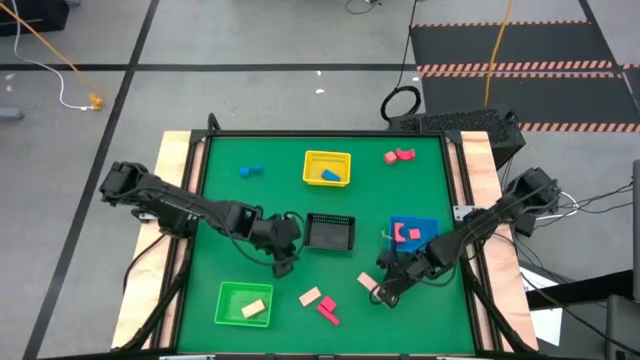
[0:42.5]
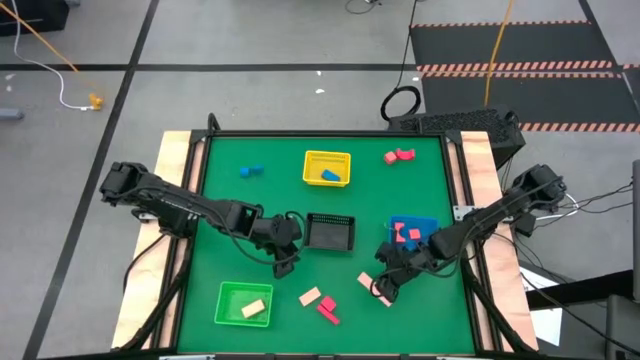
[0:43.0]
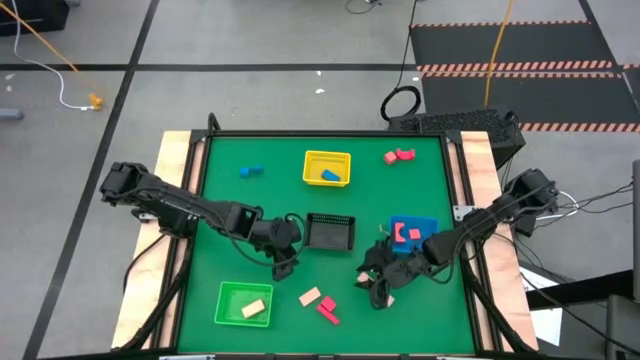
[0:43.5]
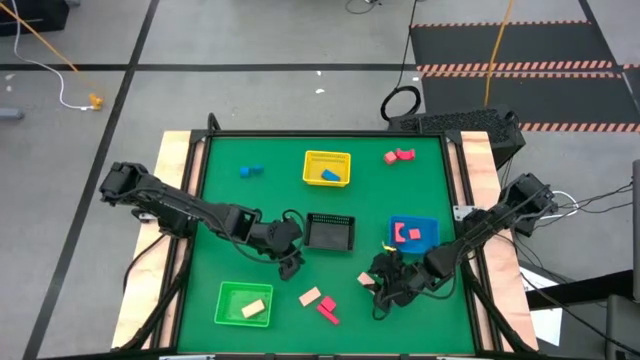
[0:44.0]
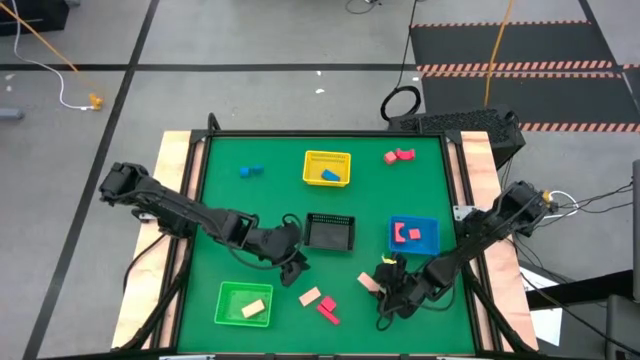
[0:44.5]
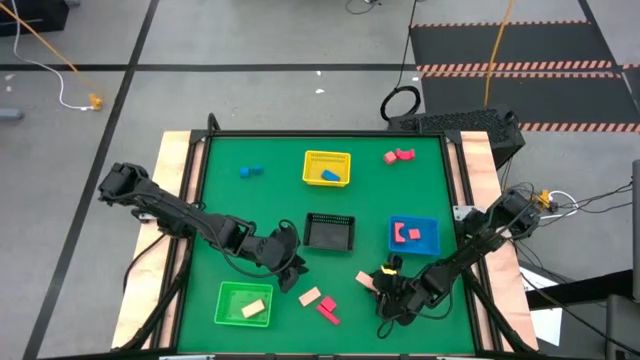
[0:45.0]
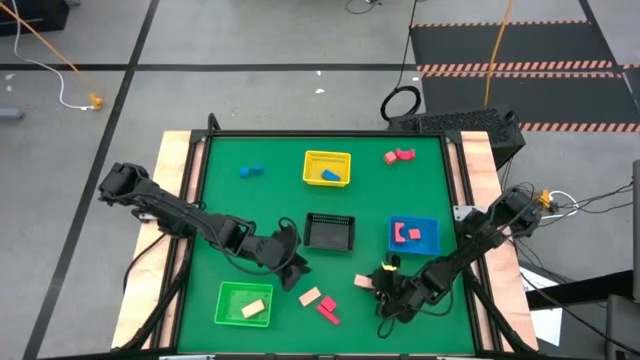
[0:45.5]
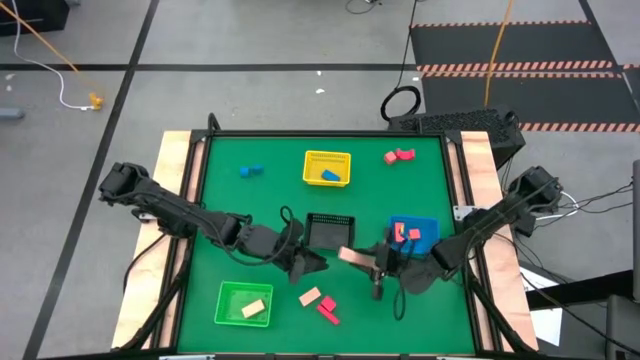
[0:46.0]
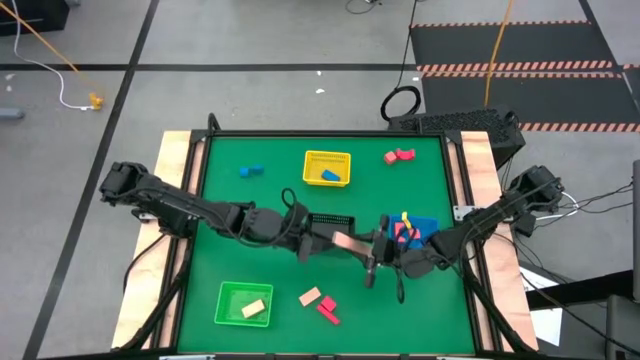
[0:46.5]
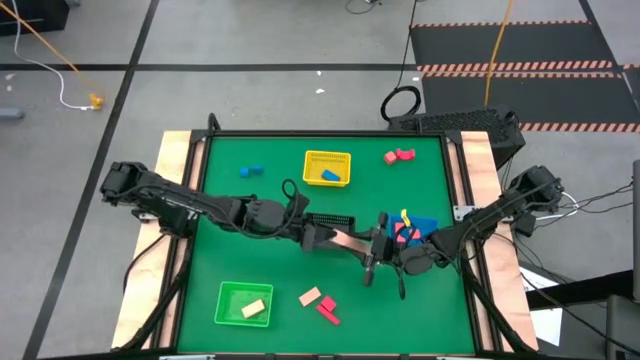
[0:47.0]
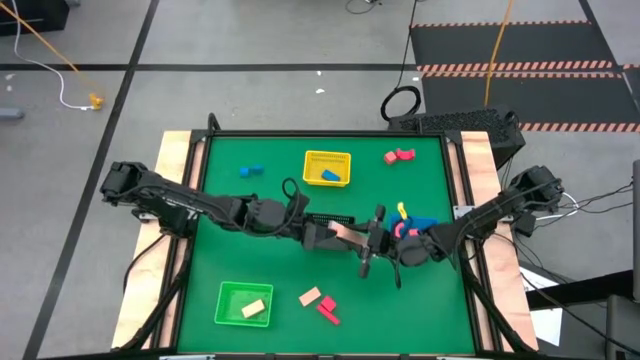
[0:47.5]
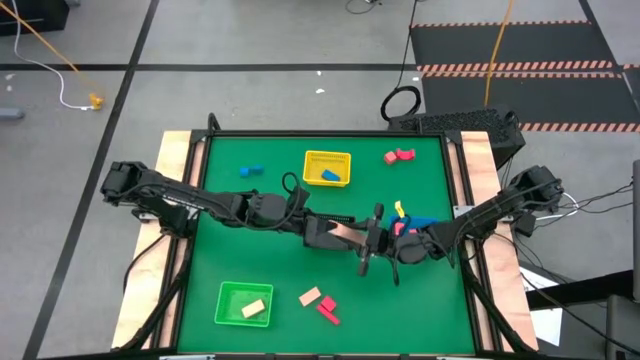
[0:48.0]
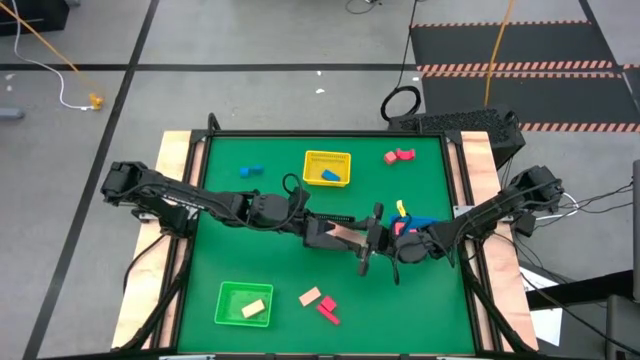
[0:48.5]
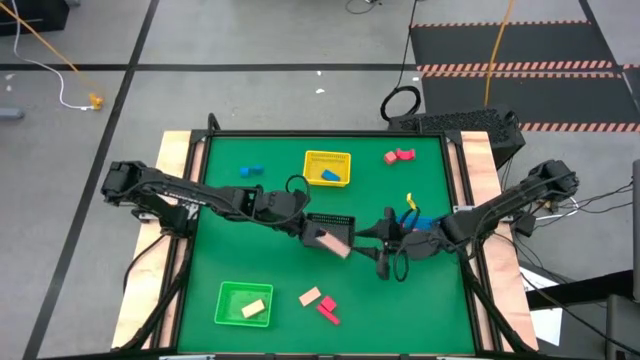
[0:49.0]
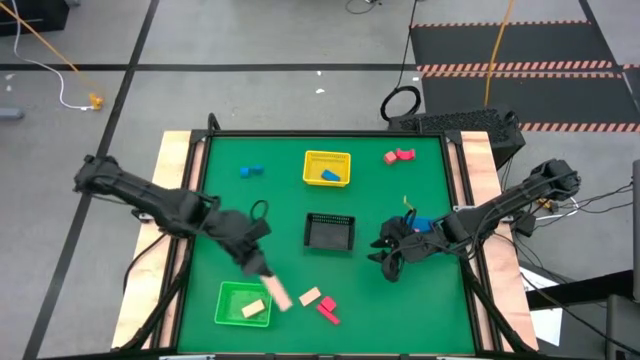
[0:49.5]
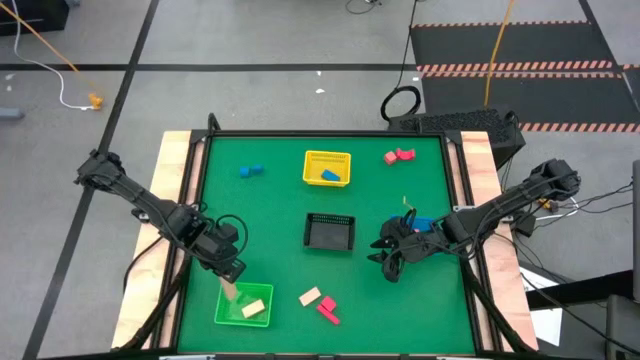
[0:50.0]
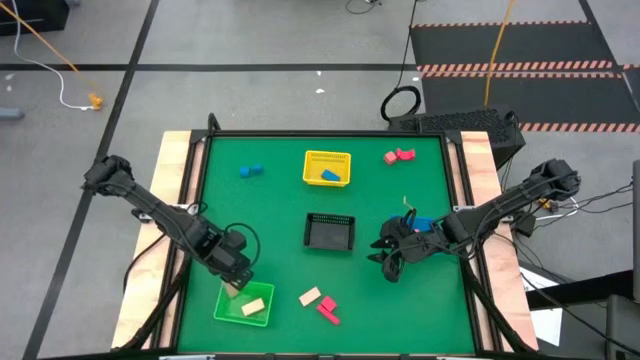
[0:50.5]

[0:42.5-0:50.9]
Task: Sort & place blocks by color
Put the right brown block into the green bin

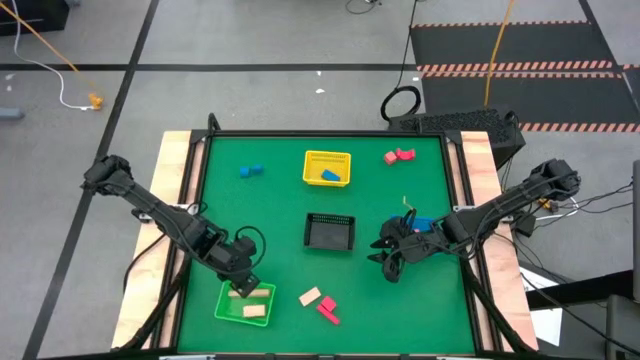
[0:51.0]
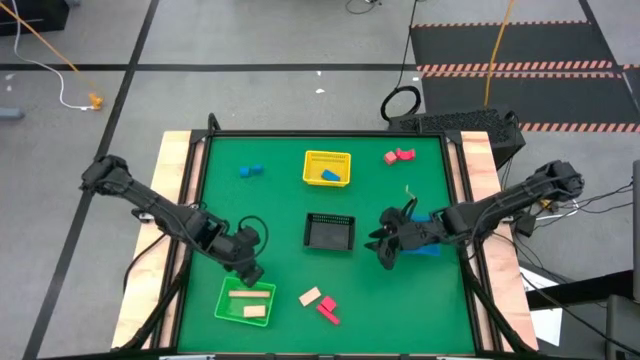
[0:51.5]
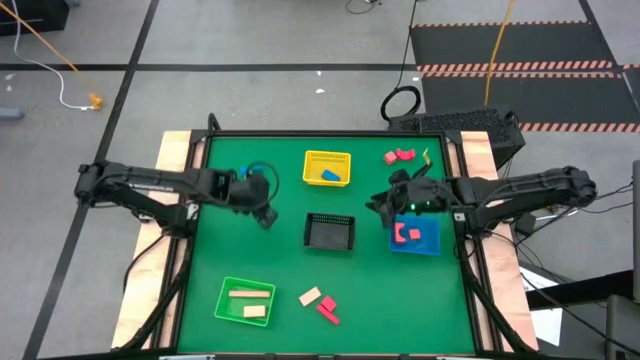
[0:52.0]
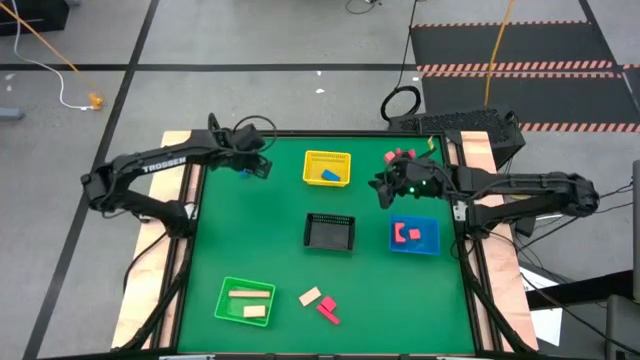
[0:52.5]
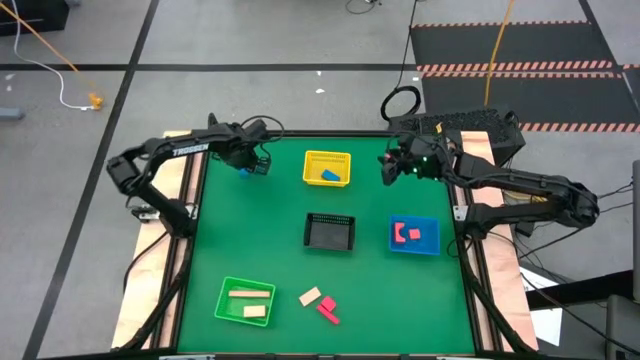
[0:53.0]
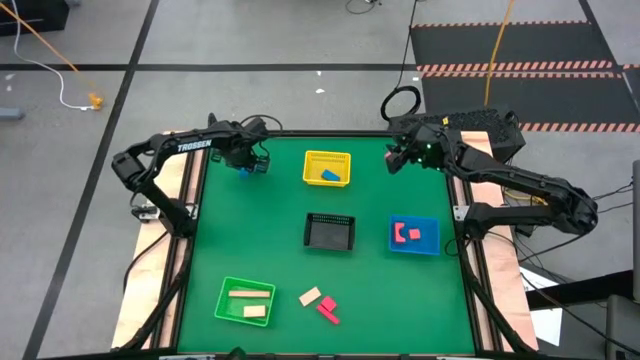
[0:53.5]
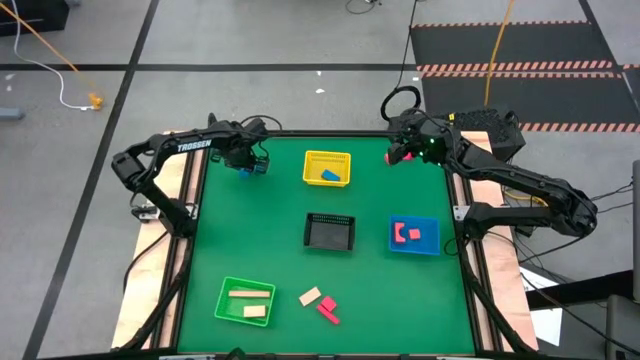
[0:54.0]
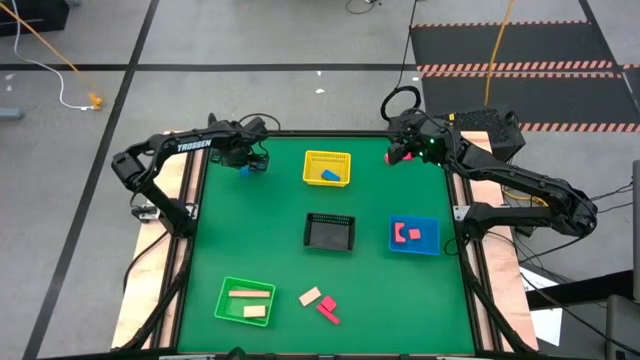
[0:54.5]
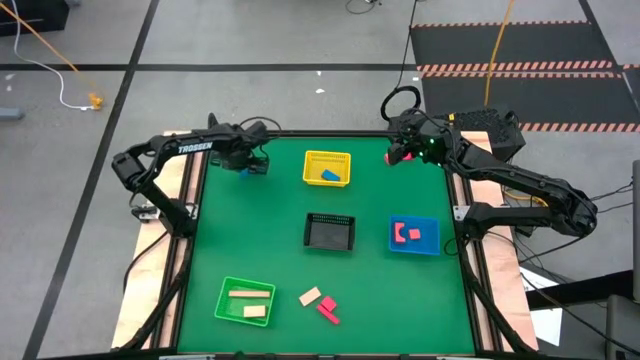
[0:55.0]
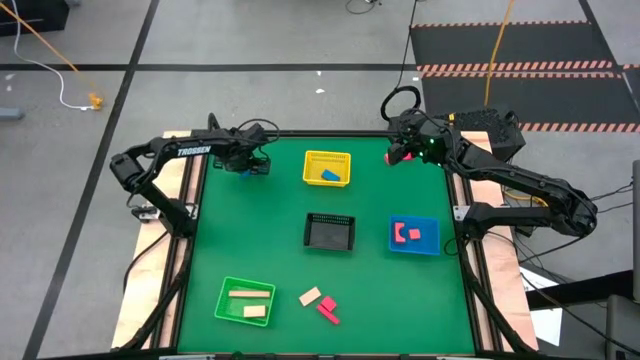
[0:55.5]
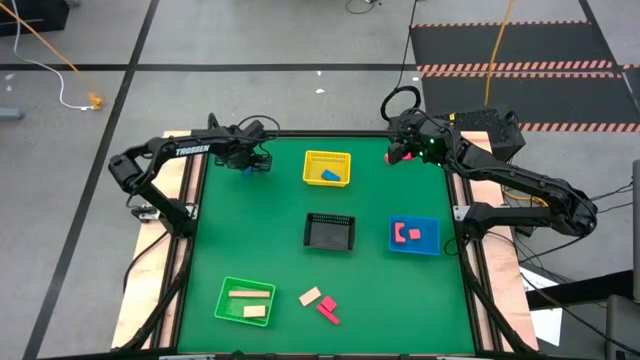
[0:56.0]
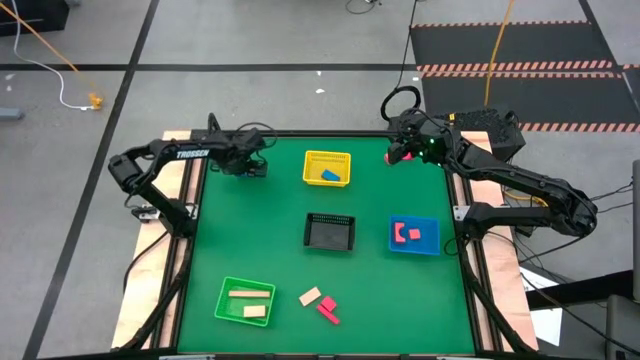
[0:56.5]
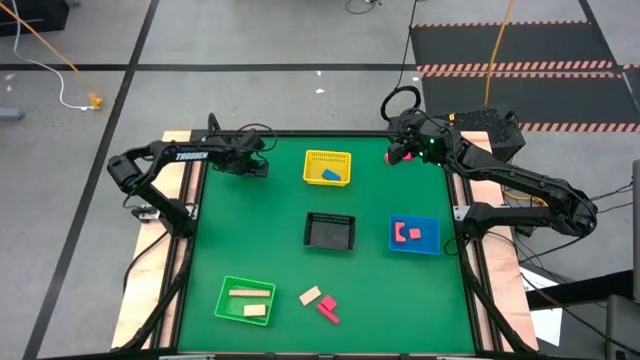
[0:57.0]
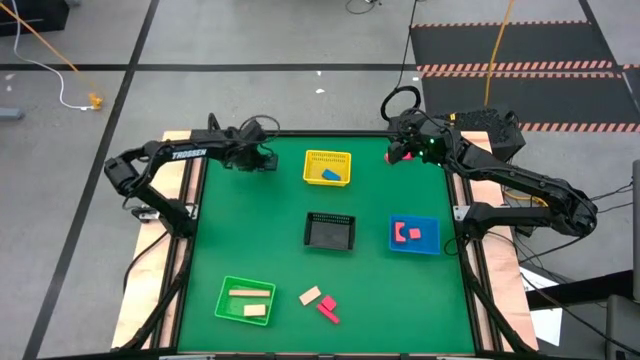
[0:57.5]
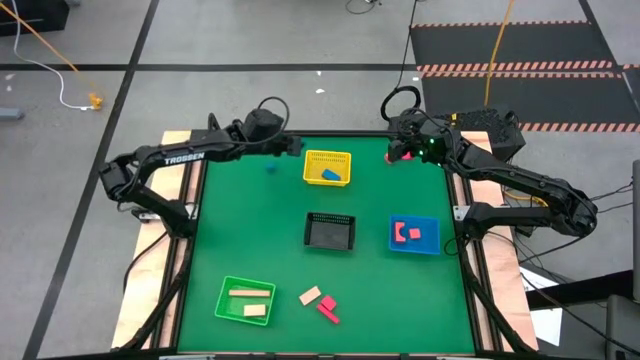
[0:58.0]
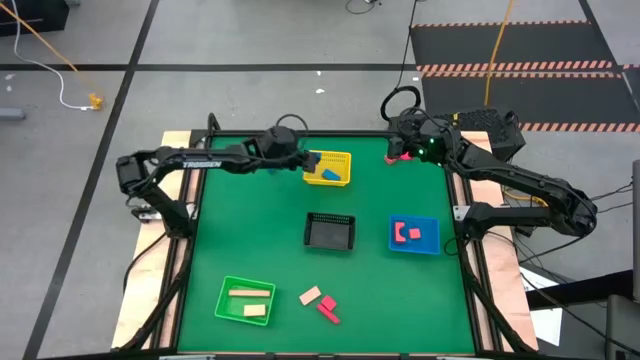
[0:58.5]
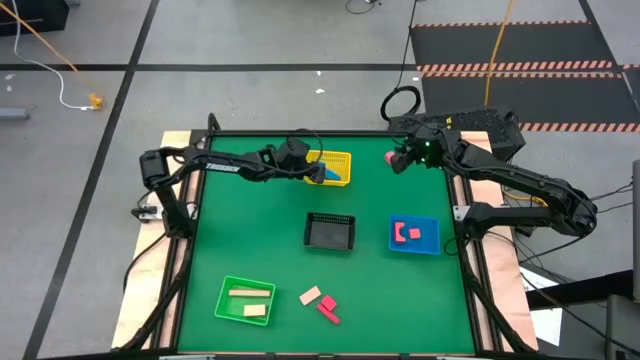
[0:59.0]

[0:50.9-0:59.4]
Put the left blue block into the yellow bin

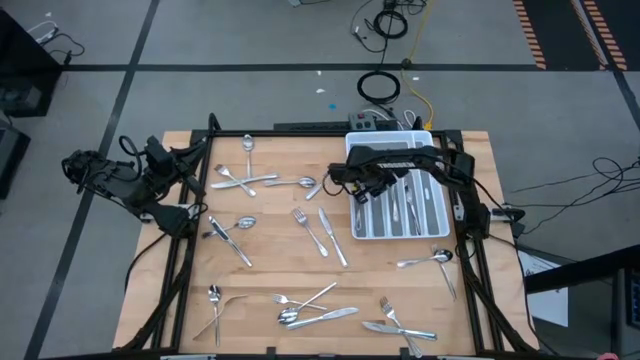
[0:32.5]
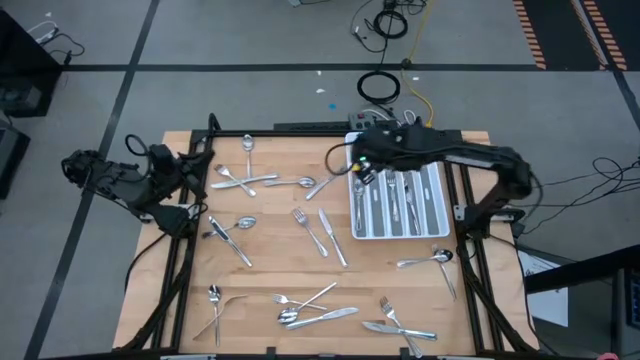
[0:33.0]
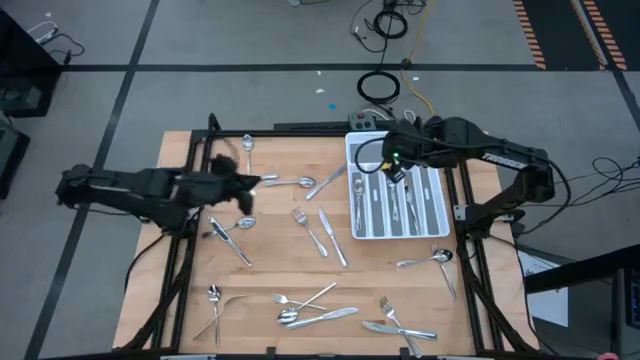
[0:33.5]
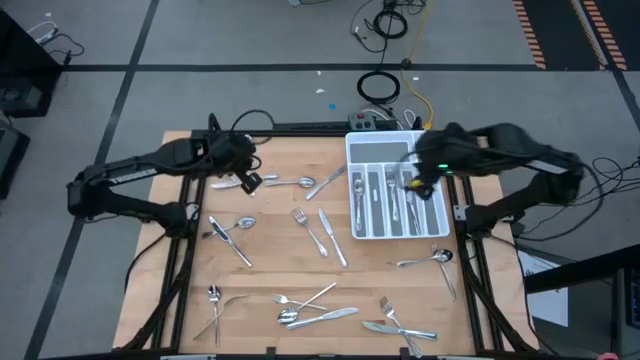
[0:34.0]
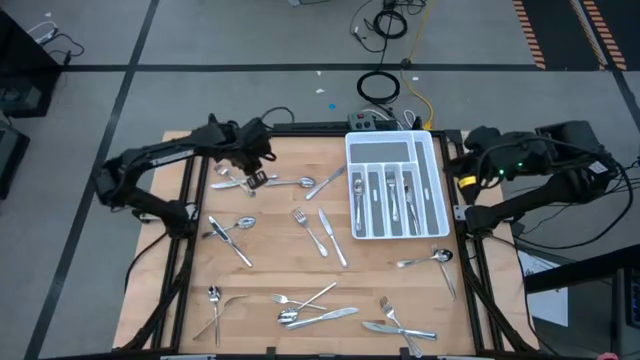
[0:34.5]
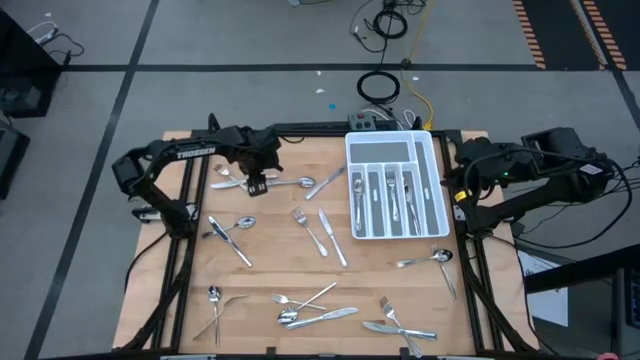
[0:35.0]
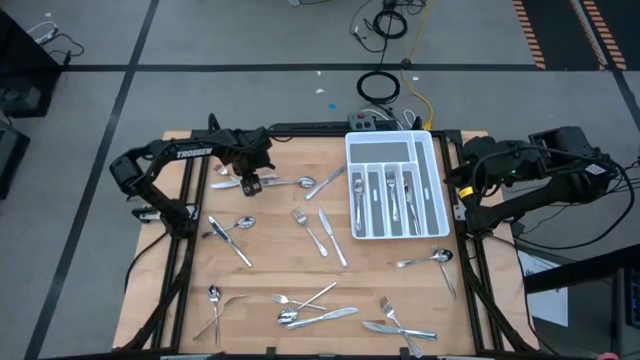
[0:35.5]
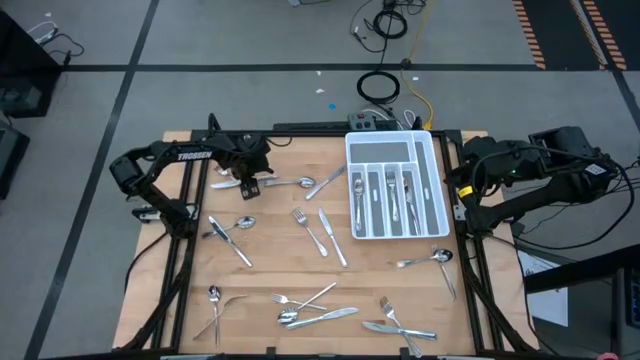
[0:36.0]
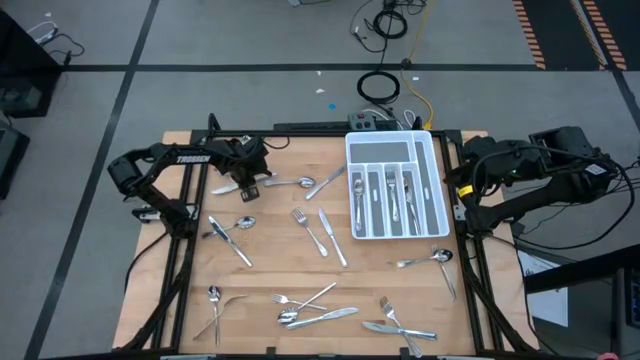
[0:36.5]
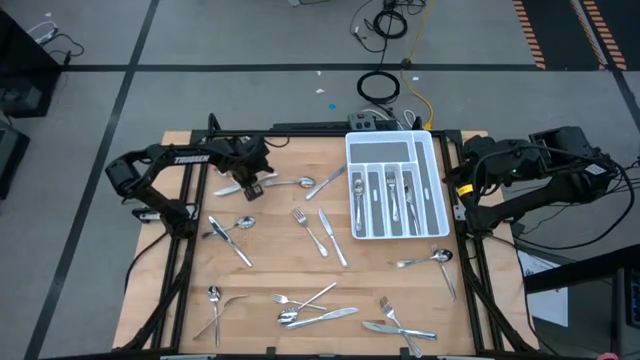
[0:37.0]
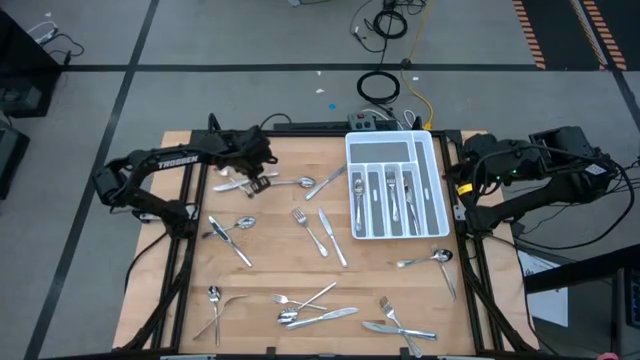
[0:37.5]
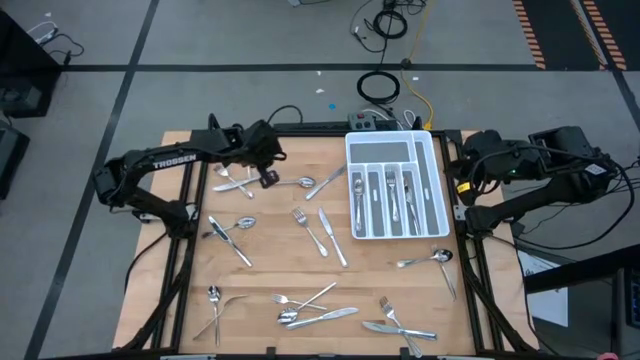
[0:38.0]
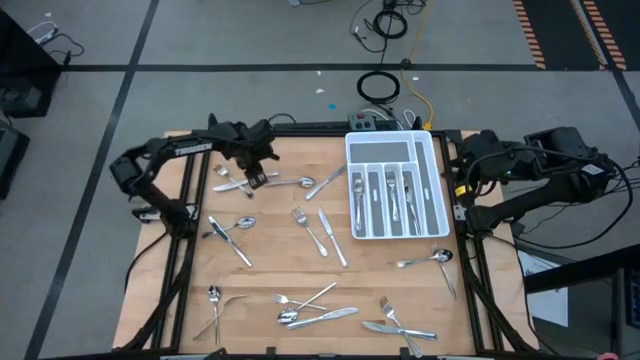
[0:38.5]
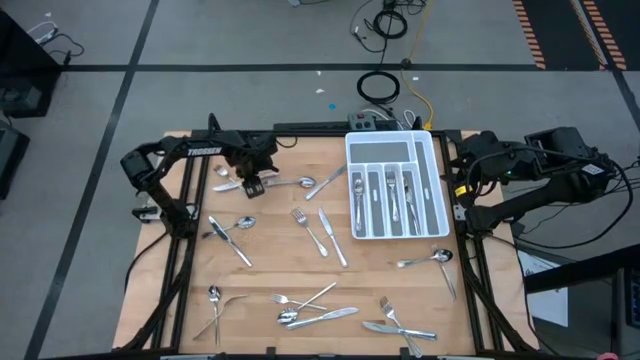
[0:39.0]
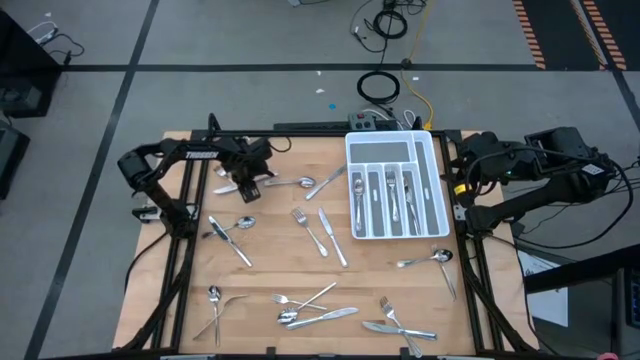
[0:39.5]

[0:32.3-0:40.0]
Task: Sort silverware
Put the silver knife into the white silverware tray
